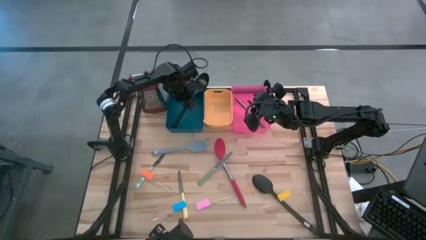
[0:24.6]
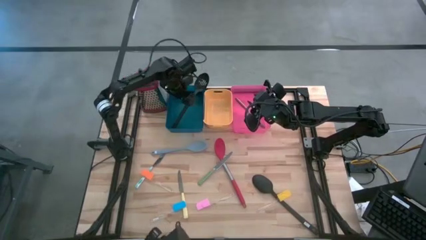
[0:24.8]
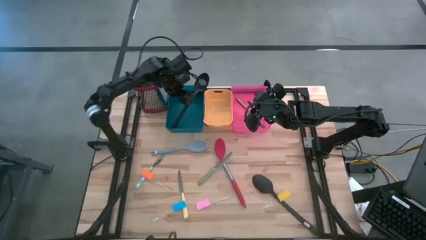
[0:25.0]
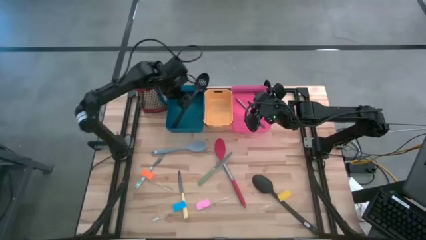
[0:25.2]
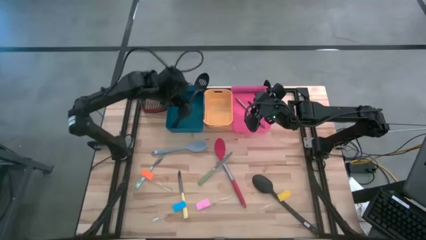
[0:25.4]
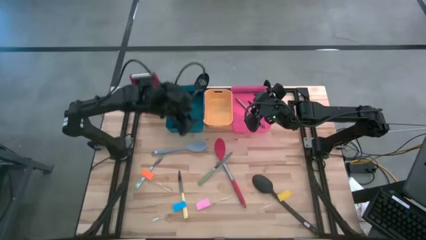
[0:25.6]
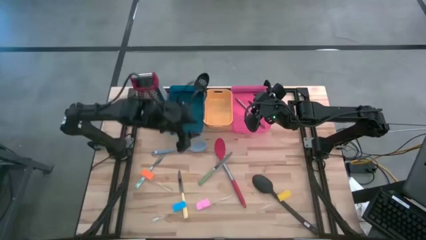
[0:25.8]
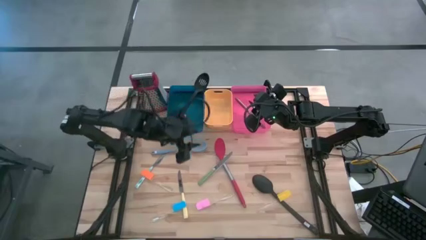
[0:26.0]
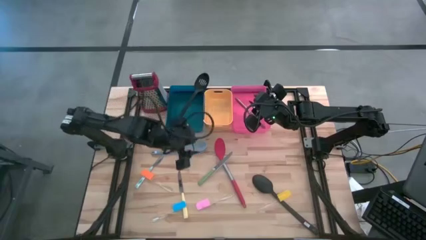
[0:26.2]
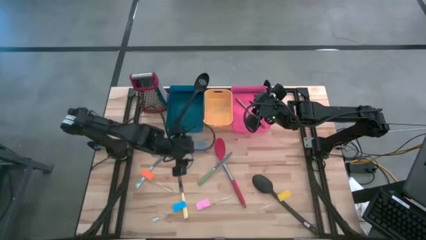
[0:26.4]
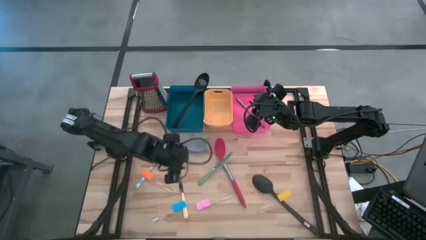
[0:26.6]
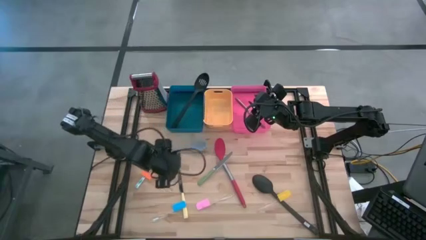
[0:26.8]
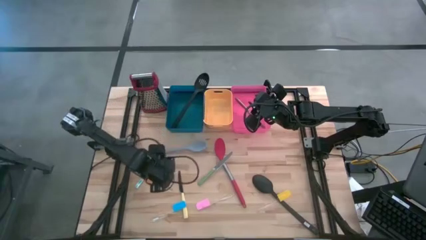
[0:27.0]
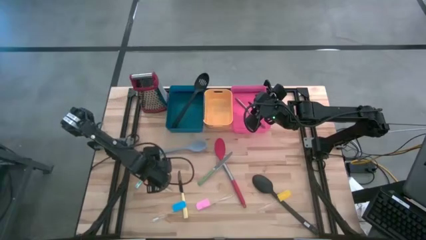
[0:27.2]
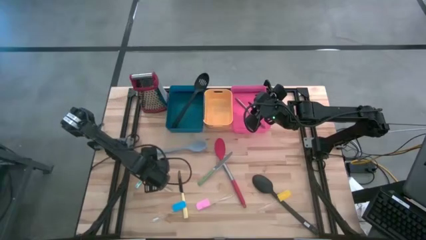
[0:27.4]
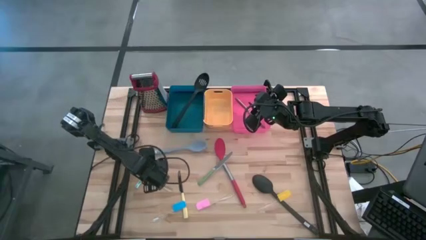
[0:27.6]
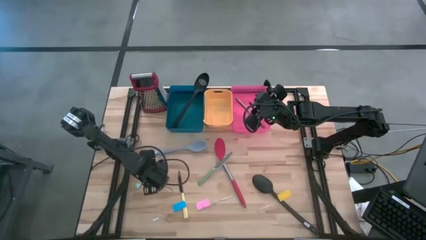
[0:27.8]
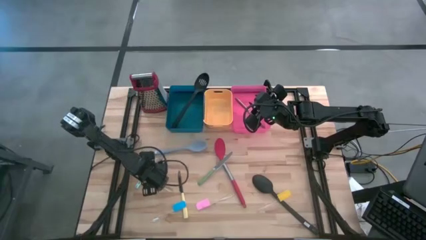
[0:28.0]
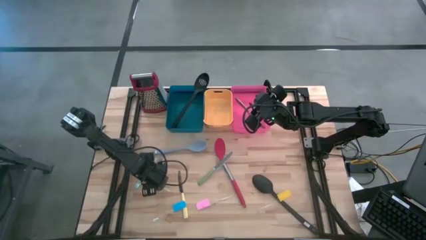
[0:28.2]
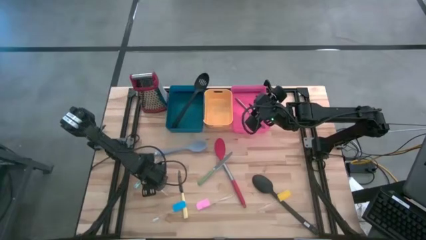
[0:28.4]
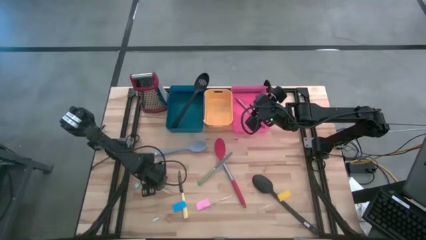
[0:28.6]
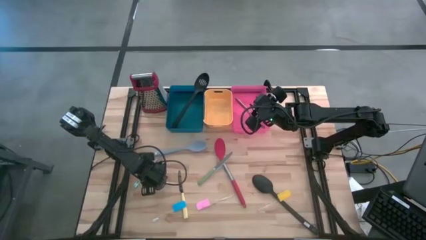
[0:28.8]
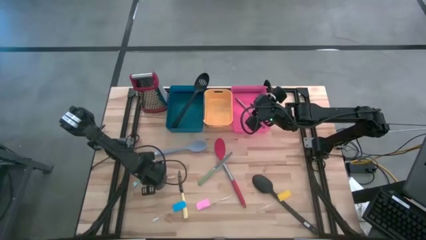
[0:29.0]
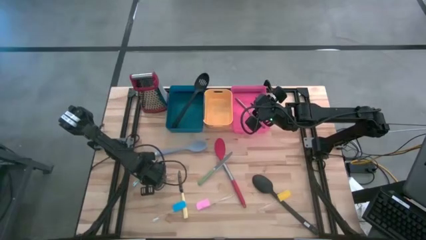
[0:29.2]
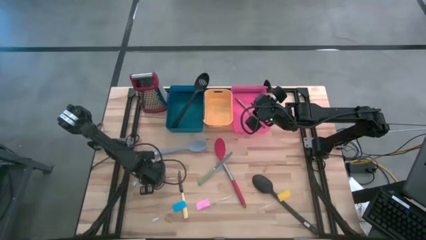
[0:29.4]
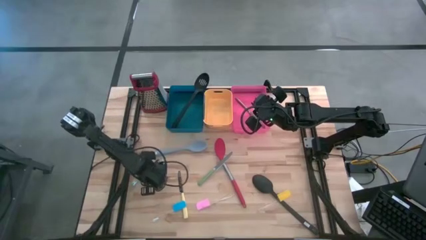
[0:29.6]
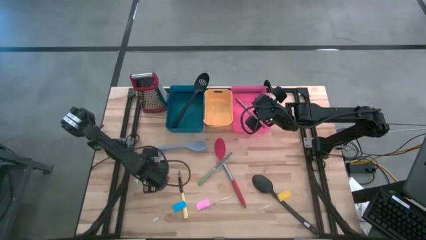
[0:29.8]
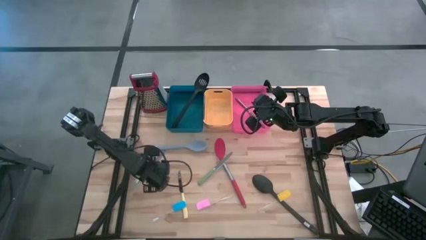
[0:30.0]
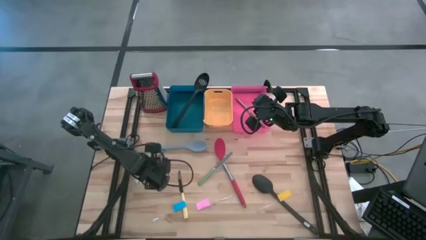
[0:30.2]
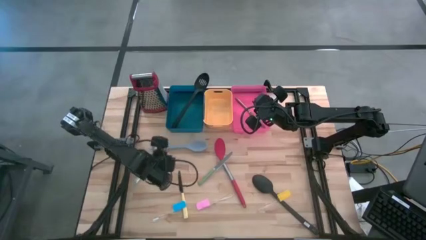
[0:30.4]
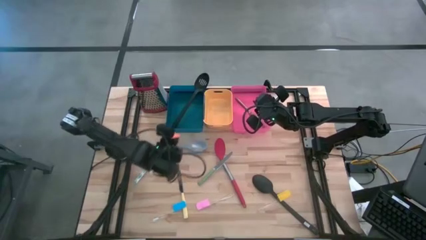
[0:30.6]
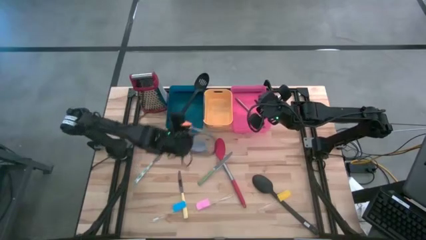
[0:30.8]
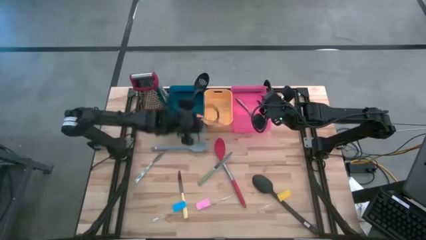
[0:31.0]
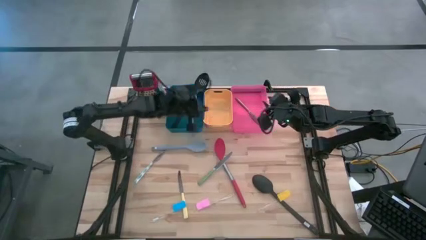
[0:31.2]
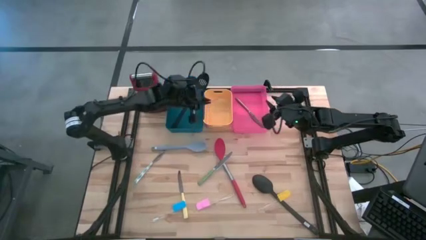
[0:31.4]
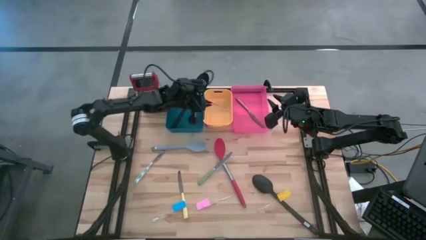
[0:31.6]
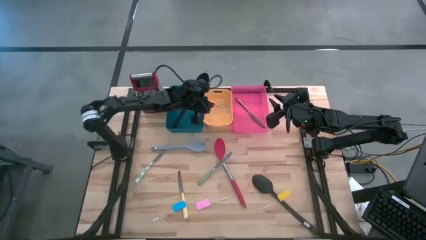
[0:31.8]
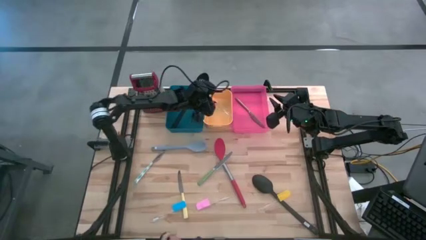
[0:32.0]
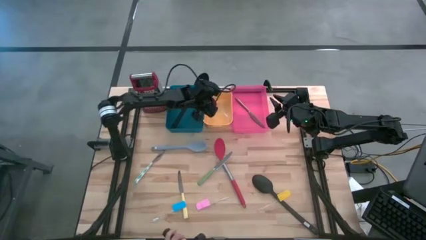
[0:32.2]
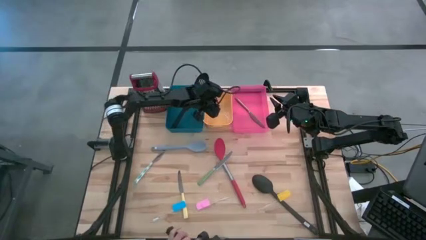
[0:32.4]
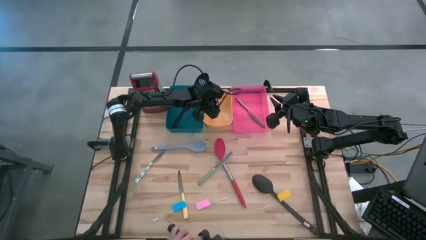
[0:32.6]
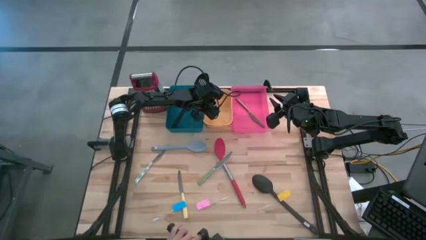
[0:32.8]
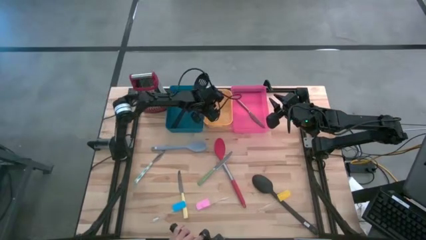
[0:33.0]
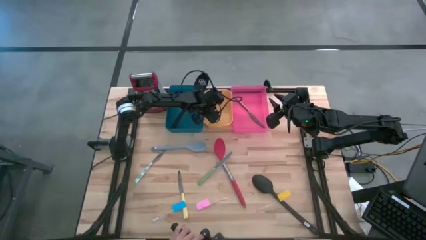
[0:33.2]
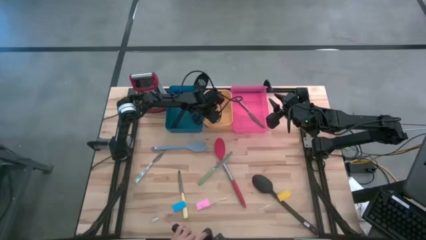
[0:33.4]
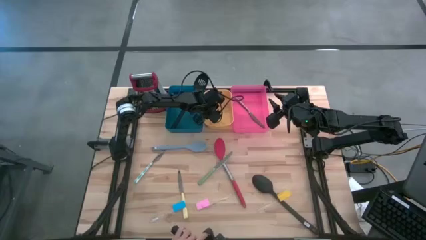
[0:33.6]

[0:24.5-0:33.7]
Task: Pick & Place Kitchen Items
Put the orange spatula into the yellow bin

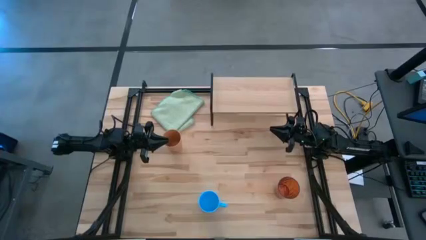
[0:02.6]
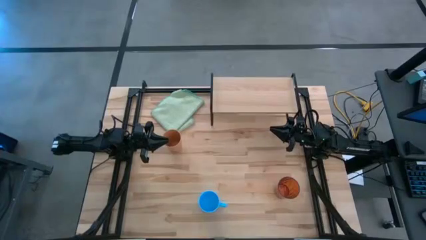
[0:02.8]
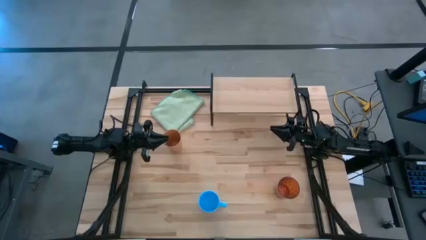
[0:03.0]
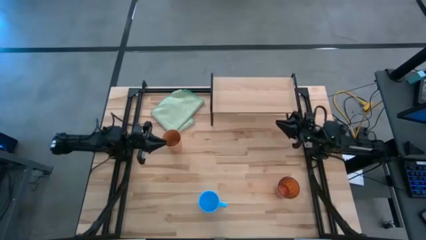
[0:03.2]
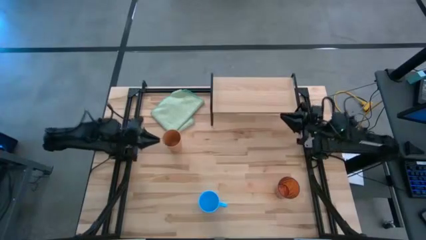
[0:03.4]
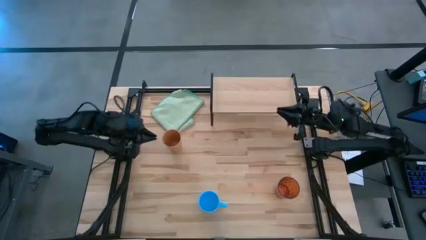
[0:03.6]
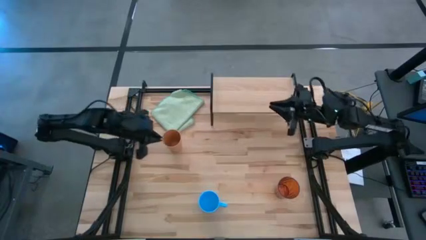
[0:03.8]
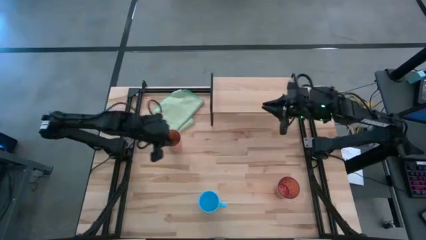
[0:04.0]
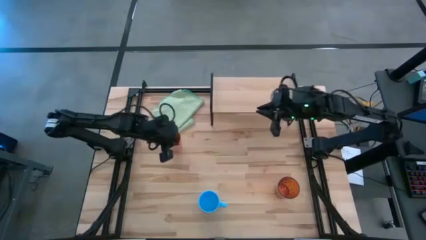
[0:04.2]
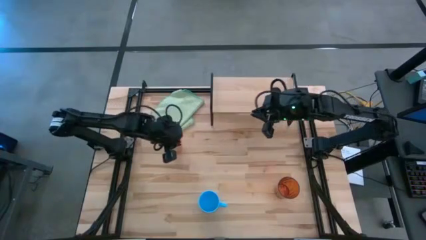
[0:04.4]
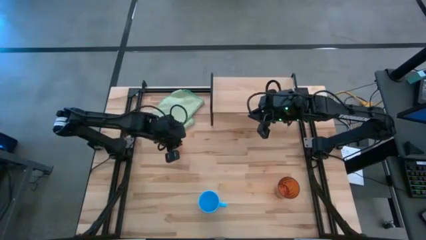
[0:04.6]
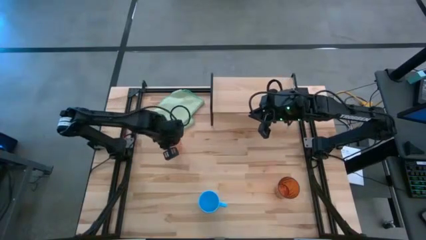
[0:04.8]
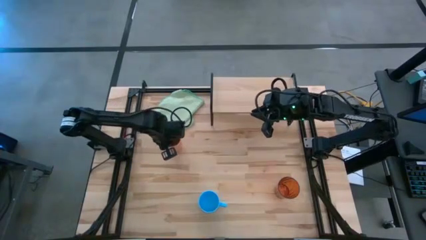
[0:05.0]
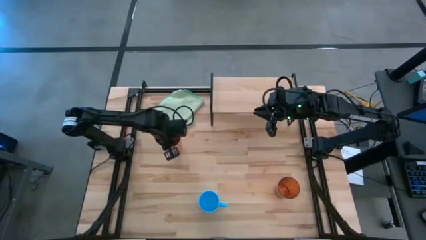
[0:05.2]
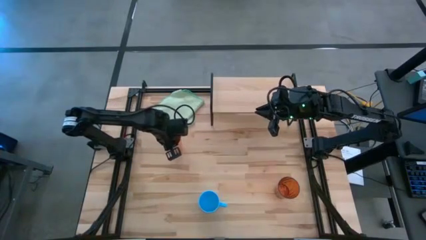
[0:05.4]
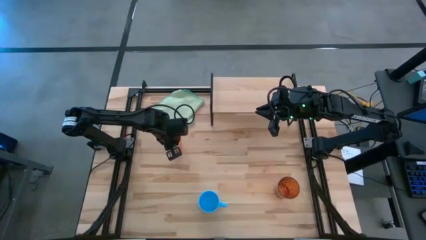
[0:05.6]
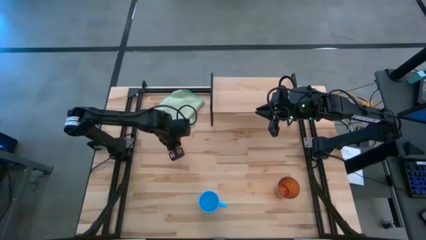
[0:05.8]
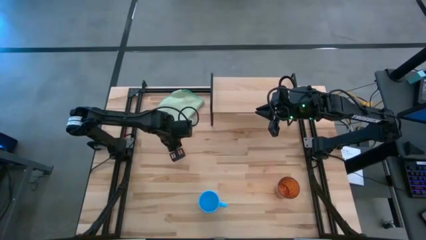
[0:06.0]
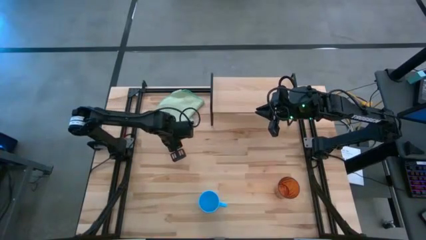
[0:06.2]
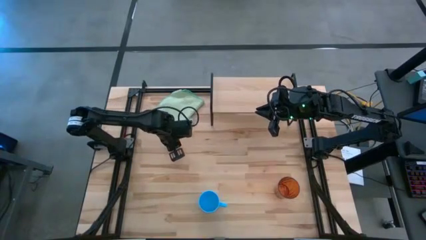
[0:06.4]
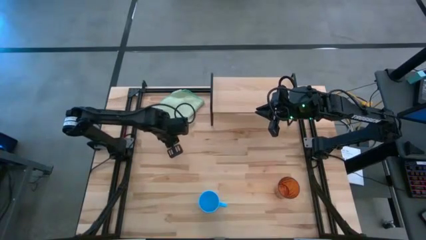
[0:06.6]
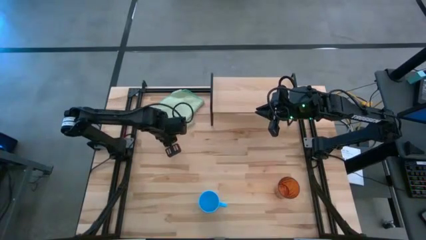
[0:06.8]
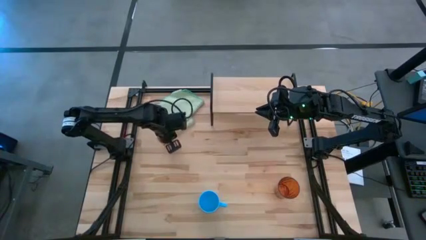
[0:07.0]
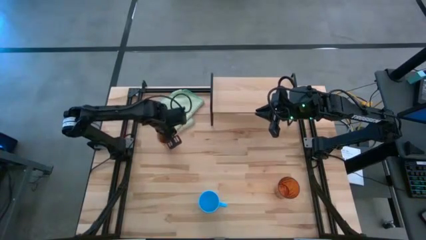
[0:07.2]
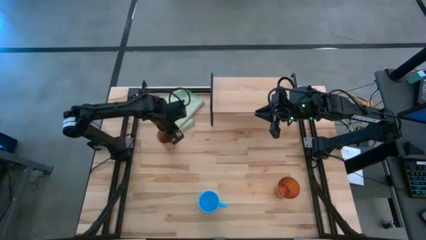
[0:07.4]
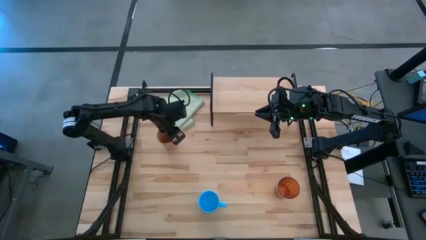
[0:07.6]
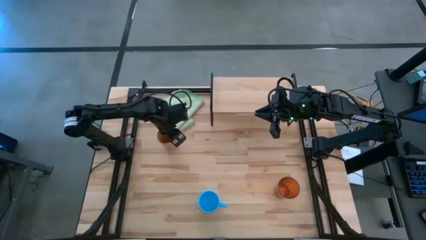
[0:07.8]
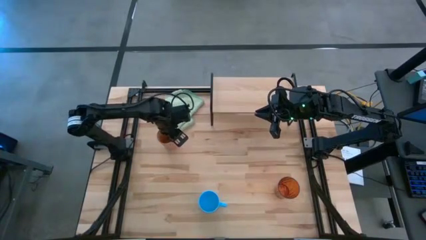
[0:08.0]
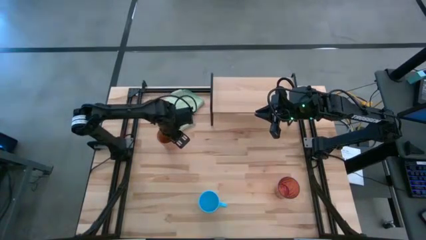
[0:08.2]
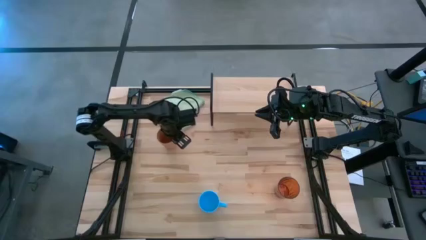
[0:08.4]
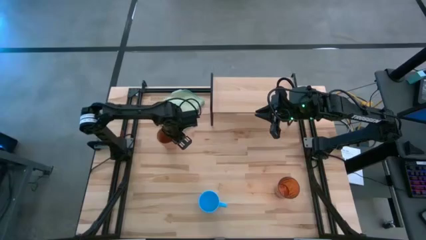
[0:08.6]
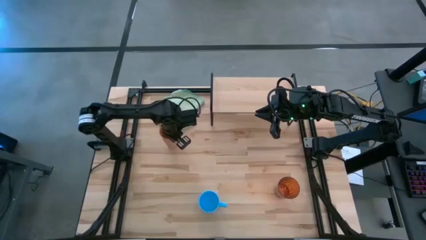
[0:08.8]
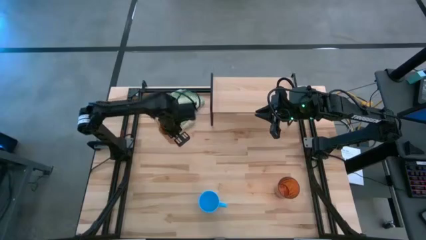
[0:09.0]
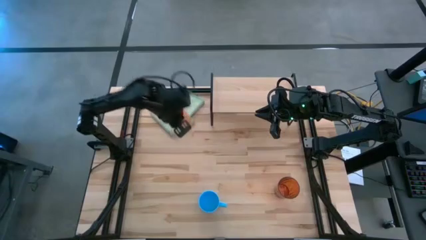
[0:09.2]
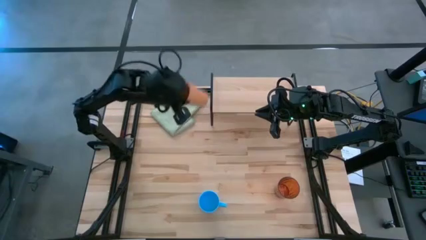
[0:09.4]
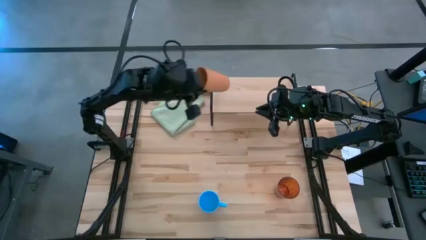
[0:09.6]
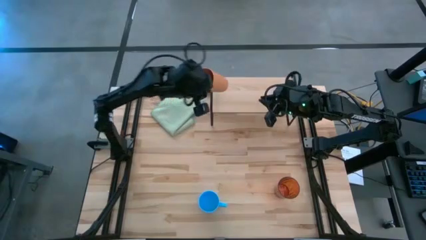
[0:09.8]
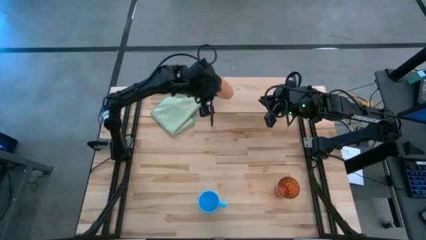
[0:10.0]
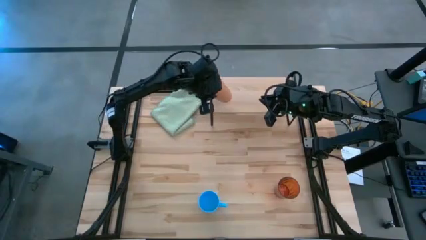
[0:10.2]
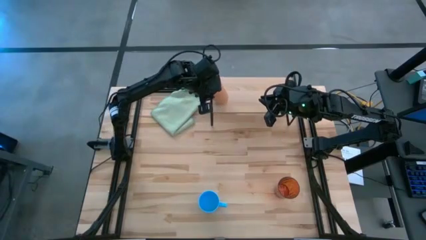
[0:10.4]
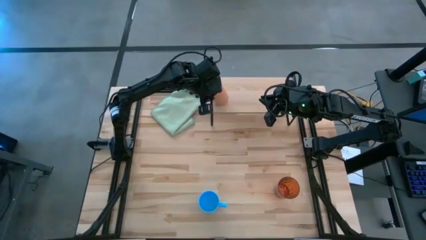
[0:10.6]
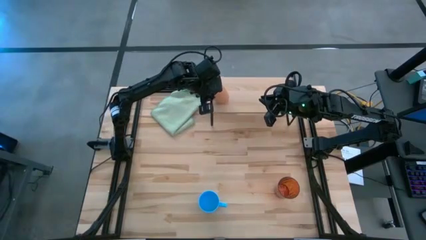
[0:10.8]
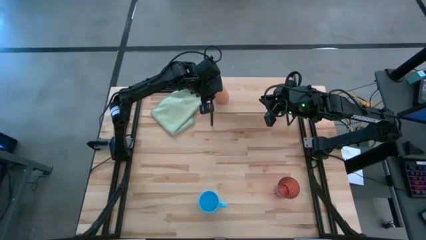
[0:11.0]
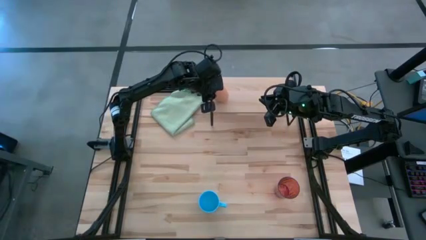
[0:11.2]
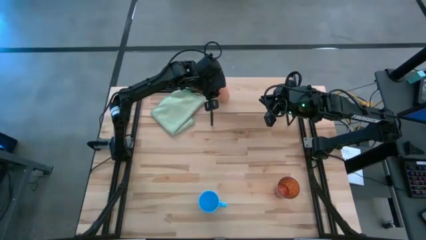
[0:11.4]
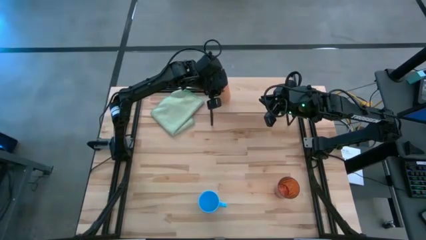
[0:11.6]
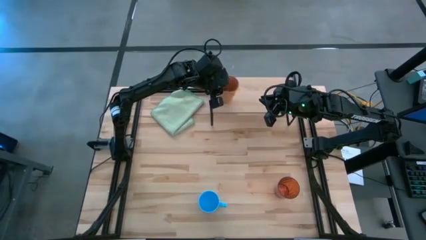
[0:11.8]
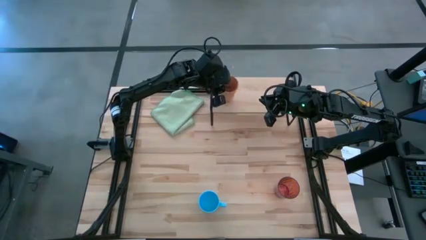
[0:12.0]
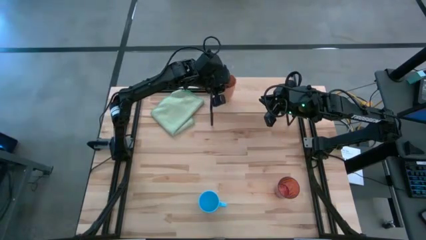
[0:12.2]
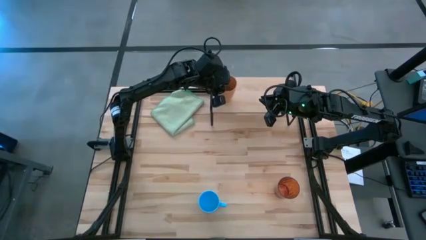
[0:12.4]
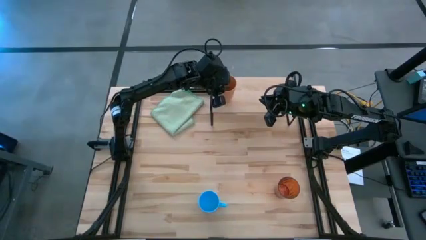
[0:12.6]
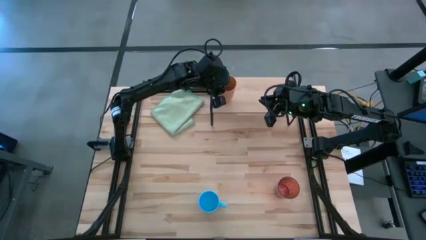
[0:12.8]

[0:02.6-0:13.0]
Task: Stack small to large cups/mugs on shelf
Put the light brown cup on the shelf
